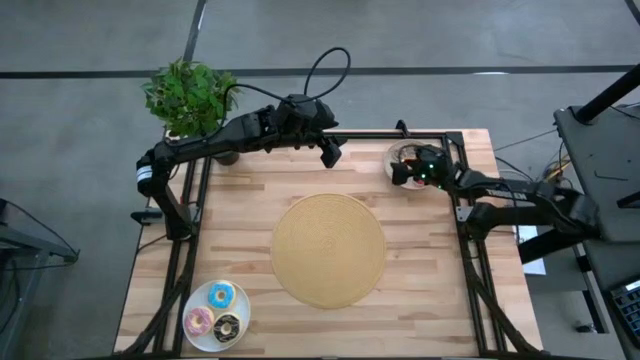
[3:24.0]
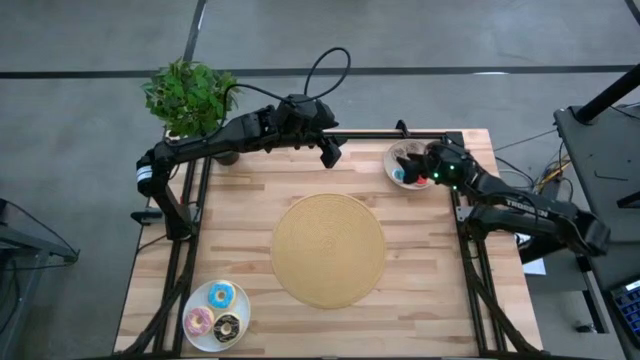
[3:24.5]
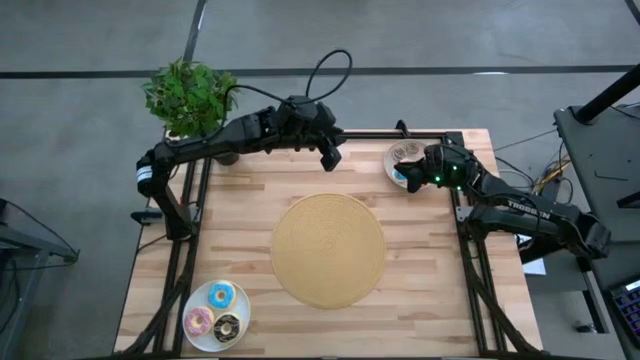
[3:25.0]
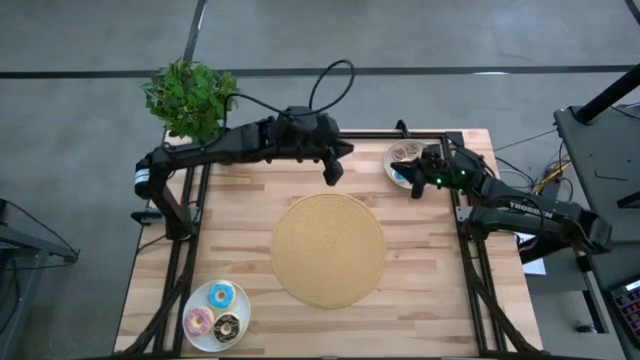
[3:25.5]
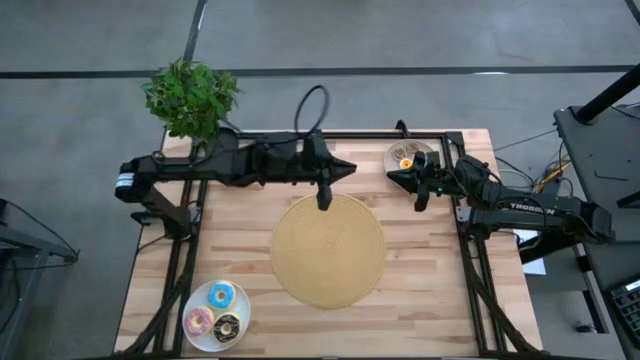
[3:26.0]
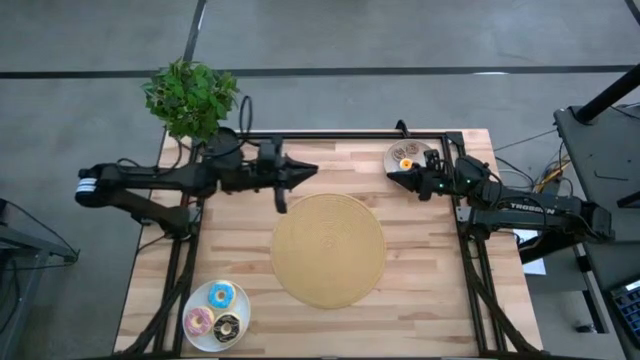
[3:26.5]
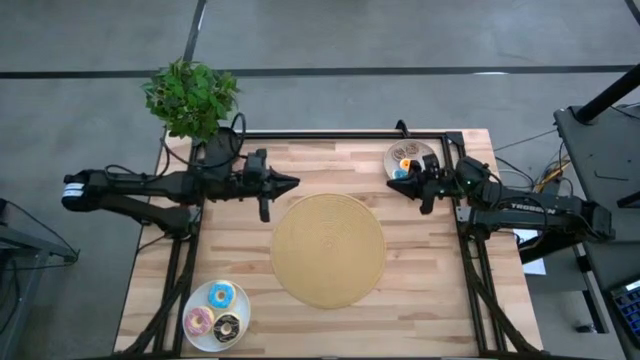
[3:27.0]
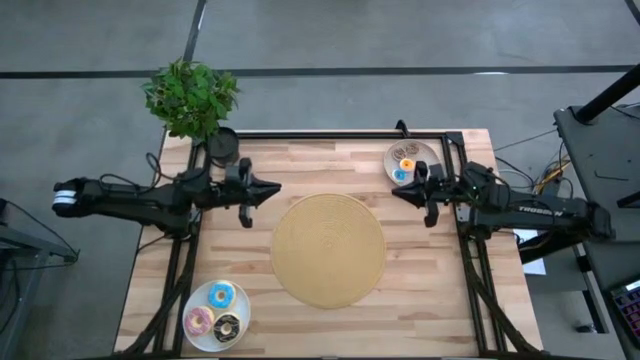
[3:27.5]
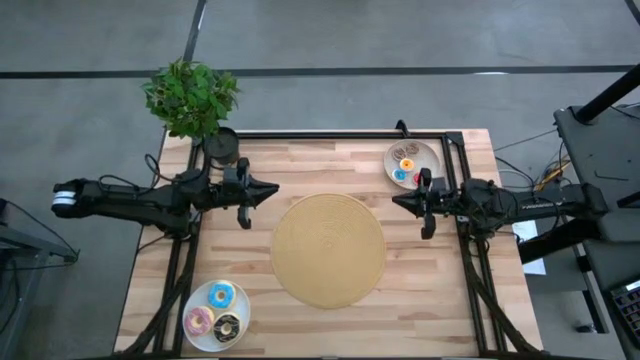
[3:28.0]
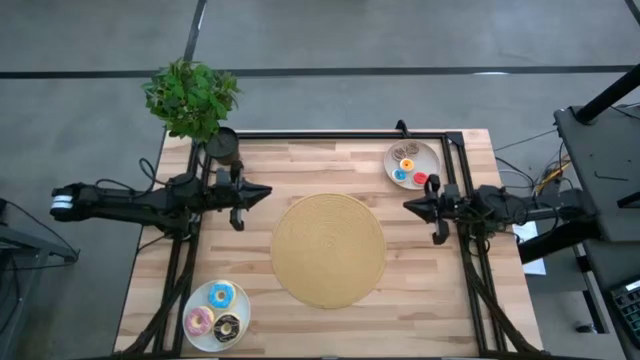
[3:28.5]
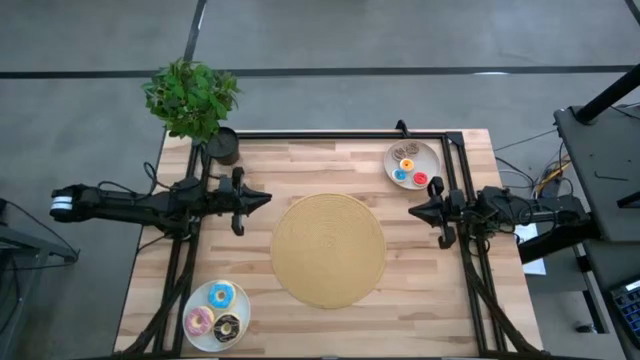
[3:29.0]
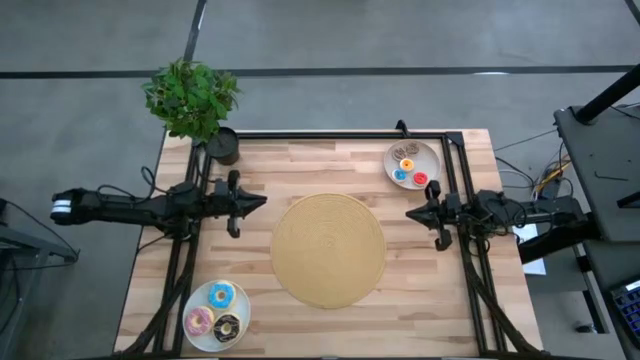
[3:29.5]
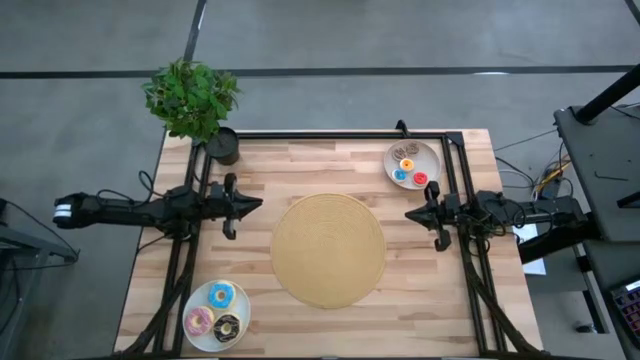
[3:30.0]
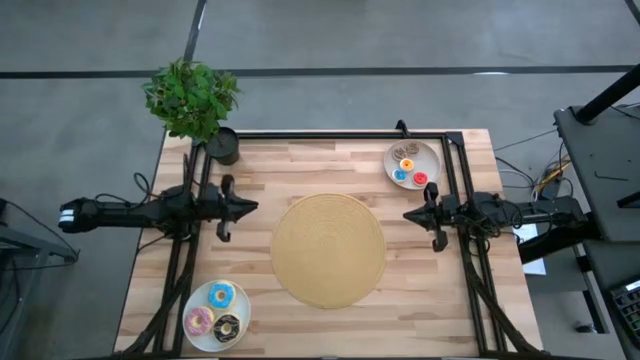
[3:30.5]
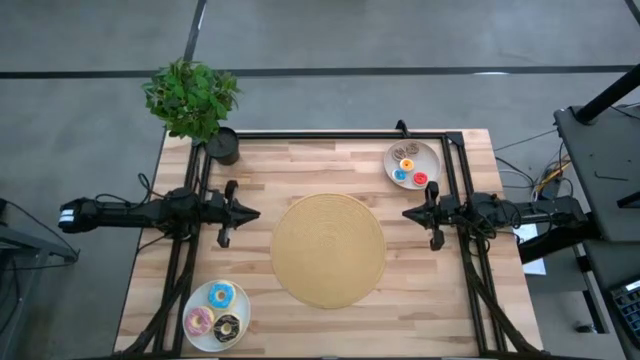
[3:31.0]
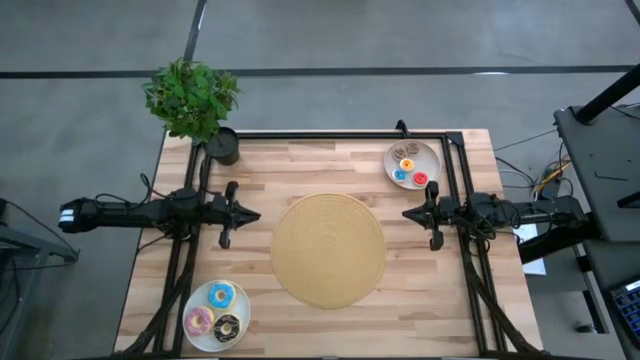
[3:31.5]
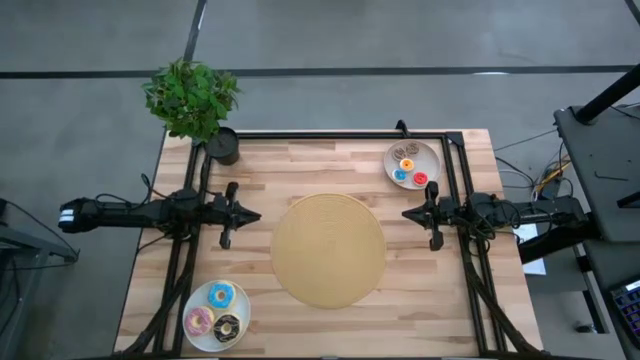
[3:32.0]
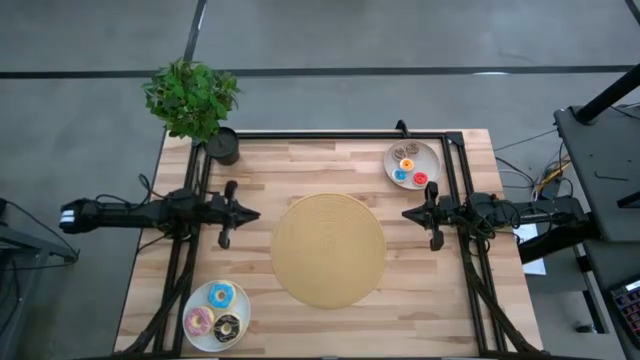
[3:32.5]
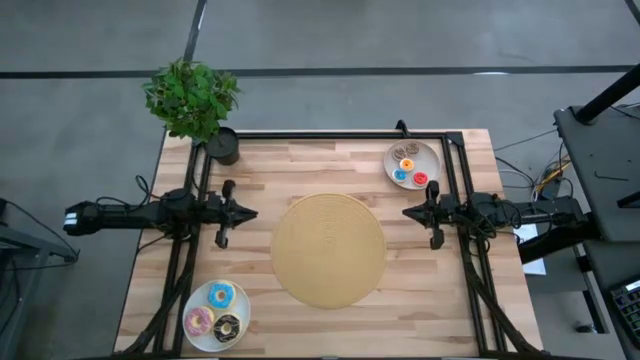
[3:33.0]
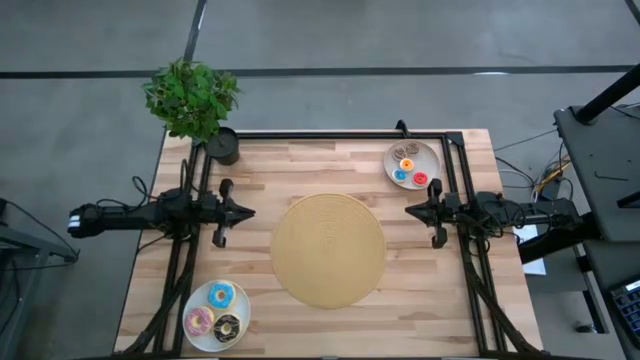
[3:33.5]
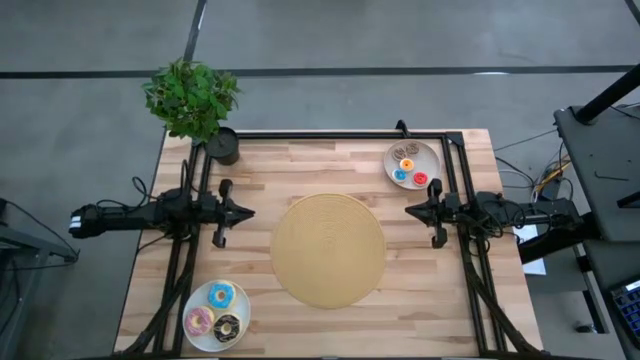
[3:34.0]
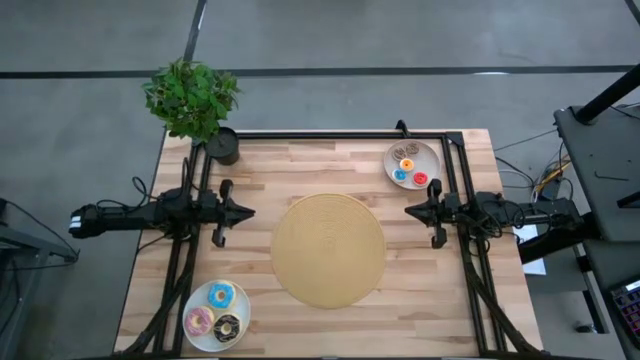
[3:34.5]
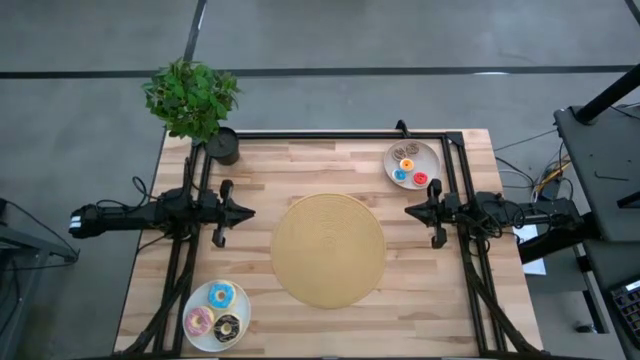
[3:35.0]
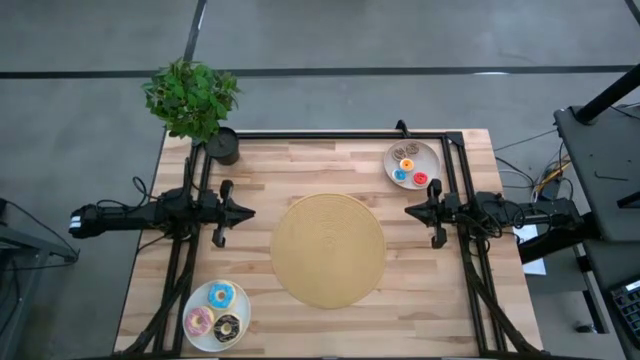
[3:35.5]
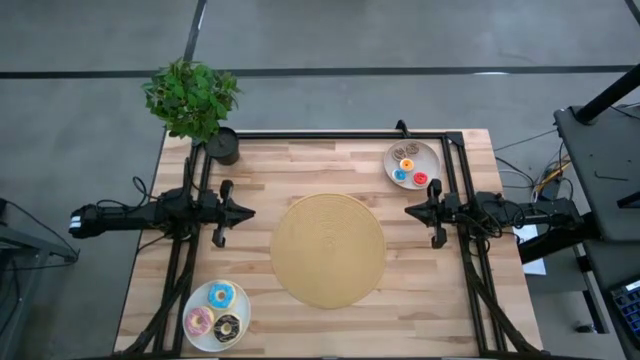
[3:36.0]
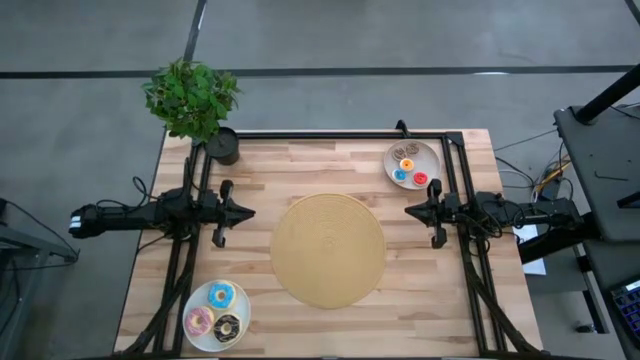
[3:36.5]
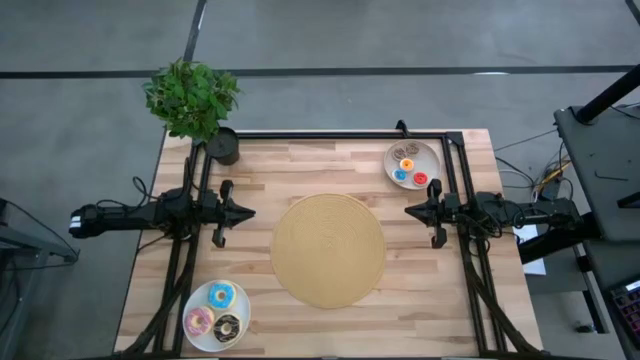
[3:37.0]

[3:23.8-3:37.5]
Task: Pick & Place donuts
Return to Home Position

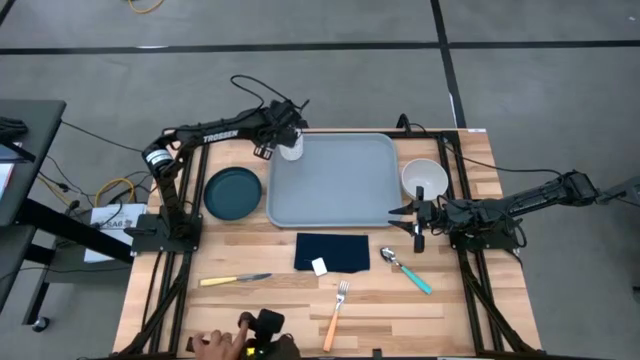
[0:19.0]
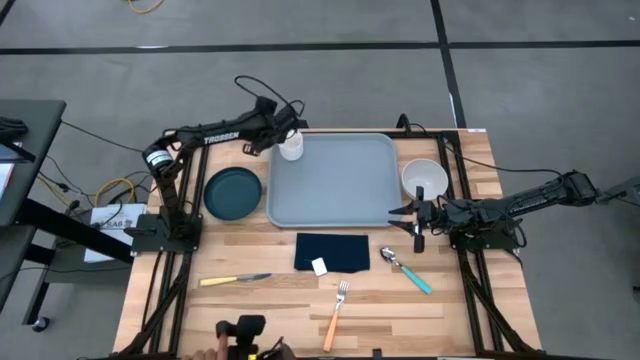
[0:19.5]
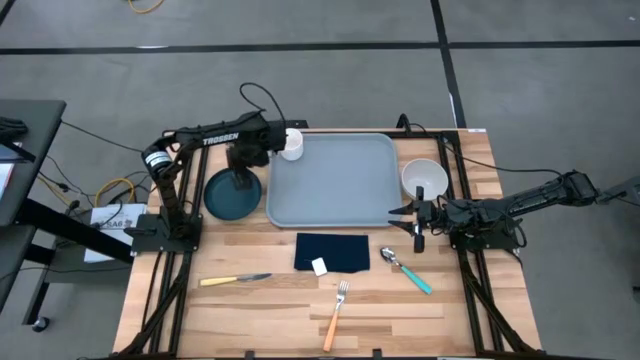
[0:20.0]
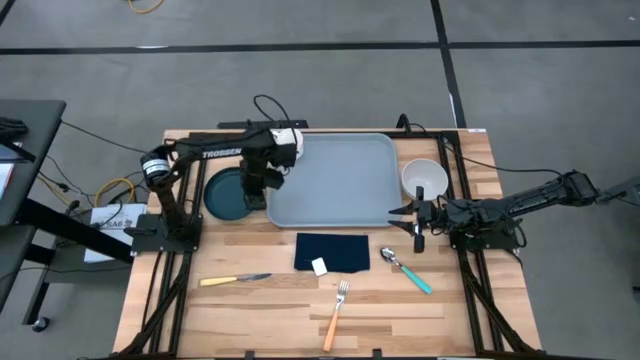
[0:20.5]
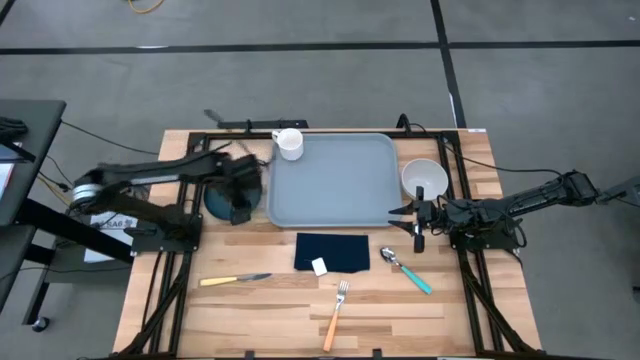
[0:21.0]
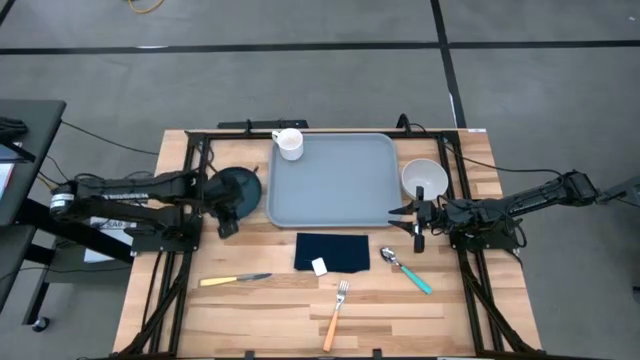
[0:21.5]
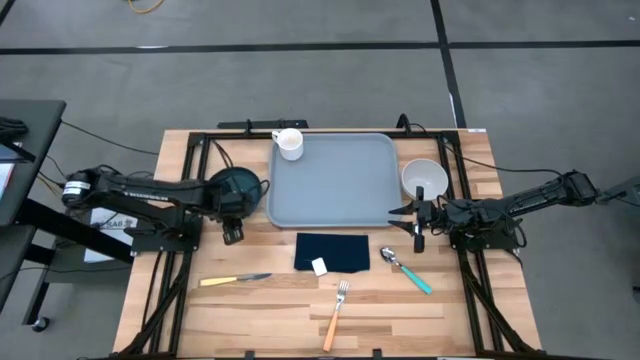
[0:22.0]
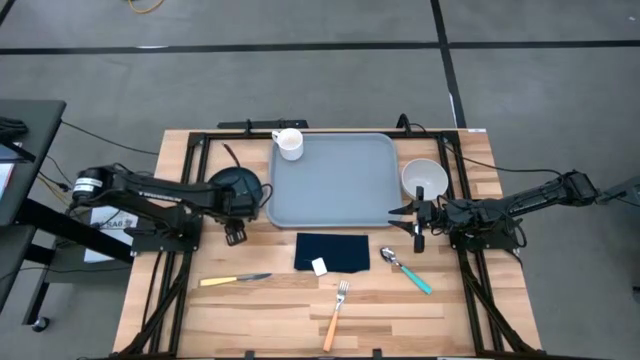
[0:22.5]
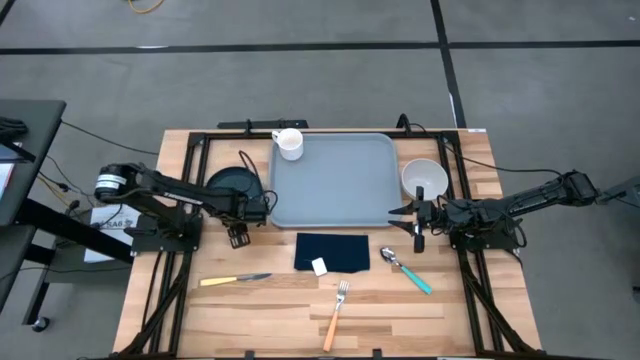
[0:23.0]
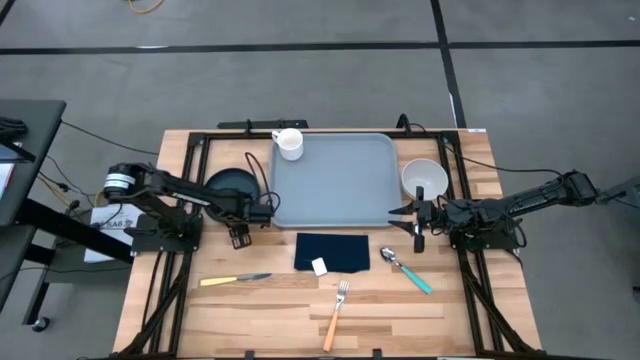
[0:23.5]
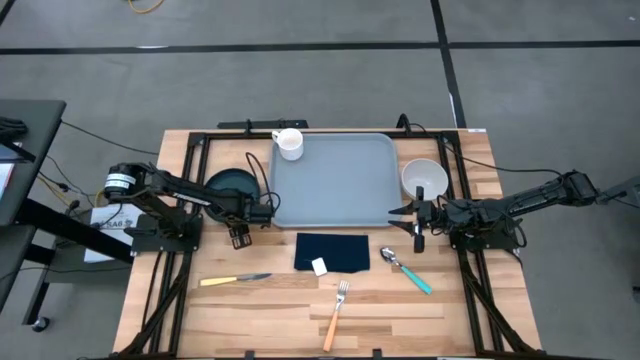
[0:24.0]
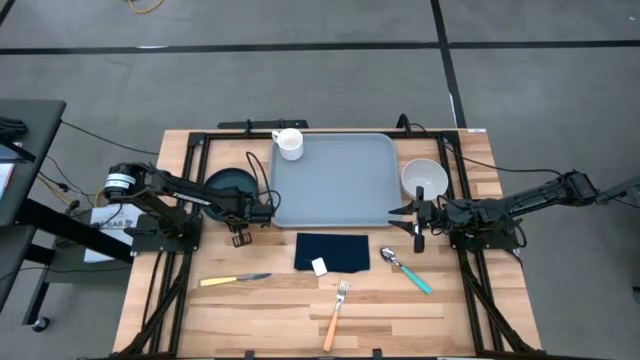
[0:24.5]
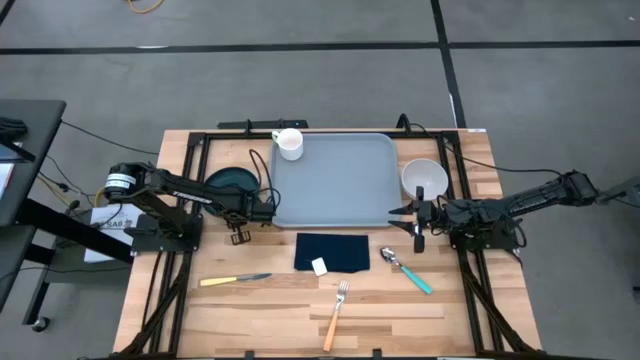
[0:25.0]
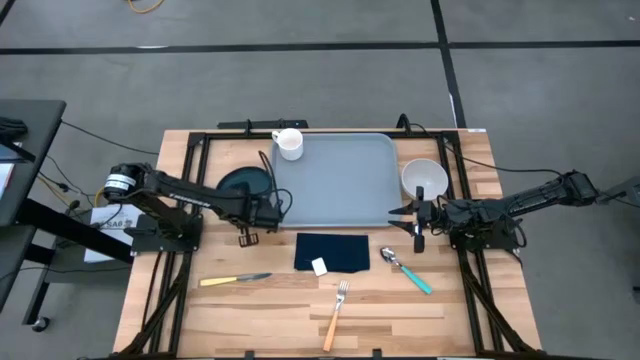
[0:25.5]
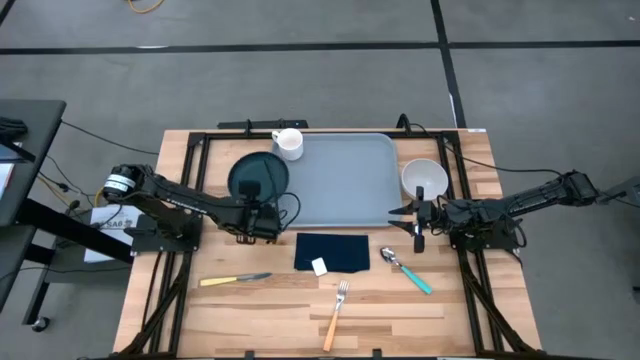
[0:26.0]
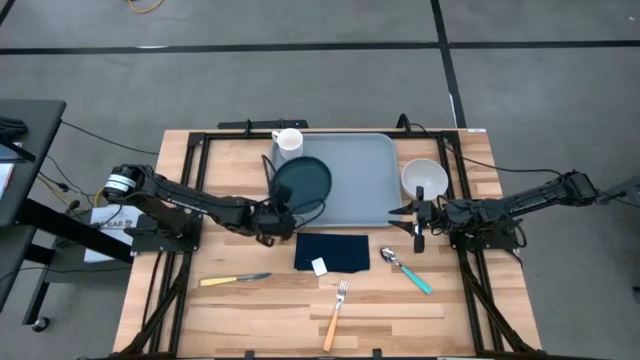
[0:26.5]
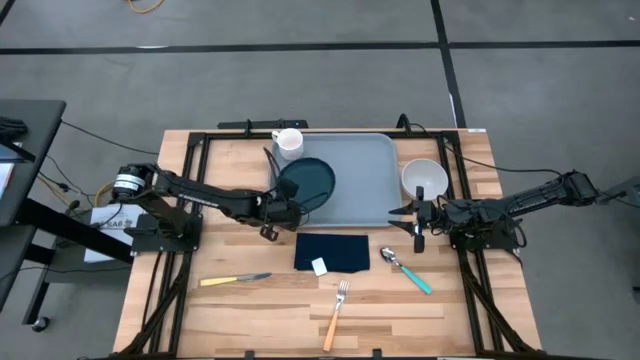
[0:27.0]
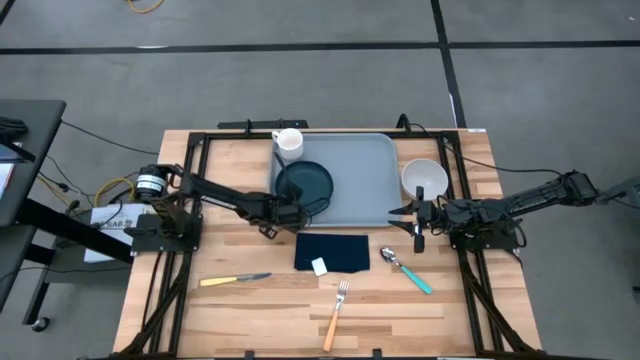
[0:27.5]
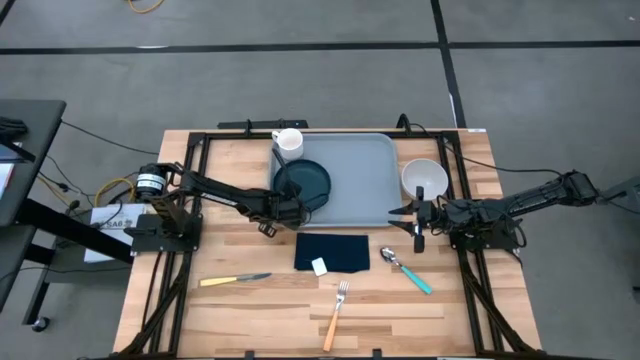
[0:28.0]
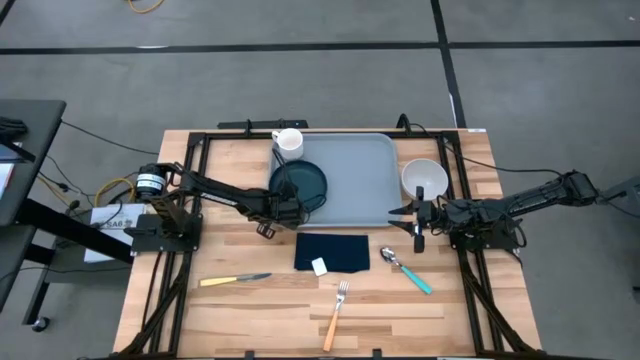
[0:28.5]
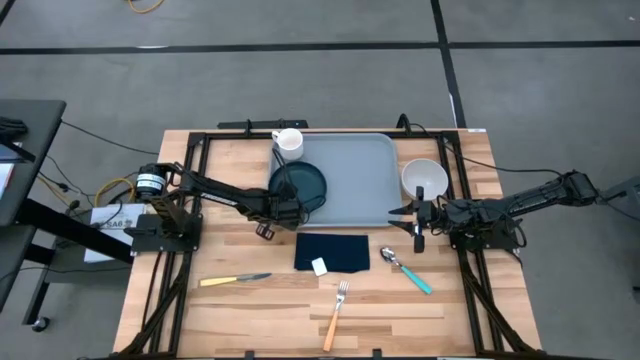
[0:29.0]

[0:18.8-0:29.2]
Task: Set up tray
Put the dark green plate under the white cup on the gray serving tray
